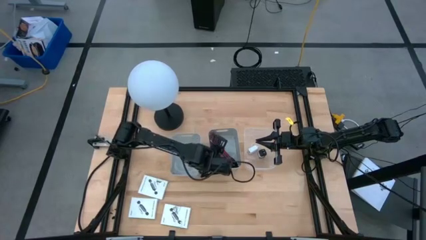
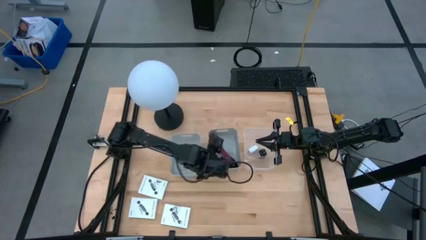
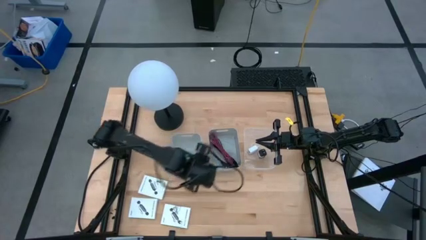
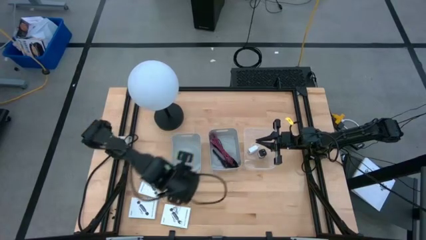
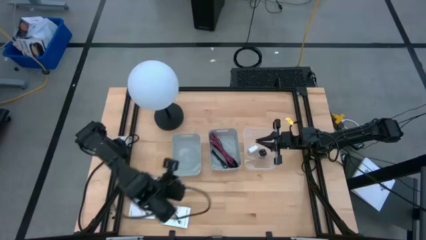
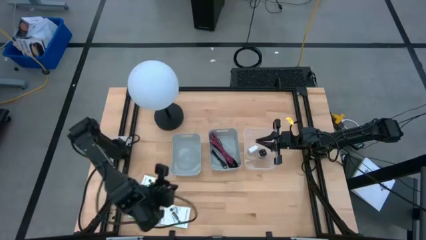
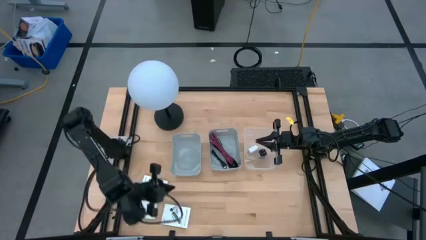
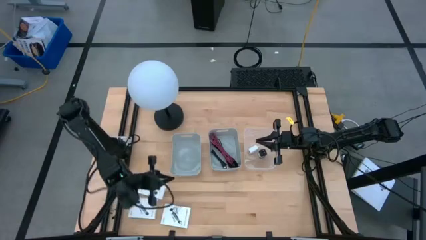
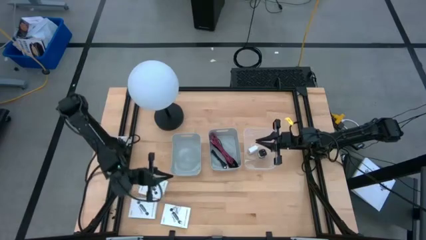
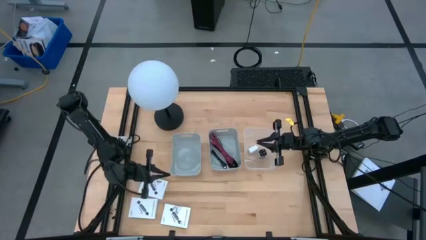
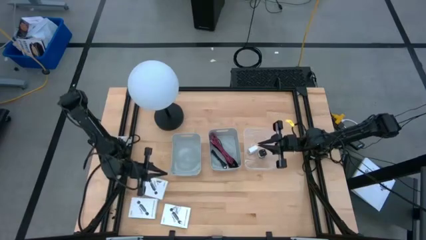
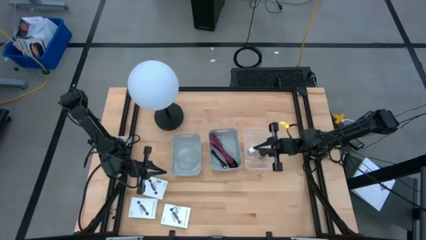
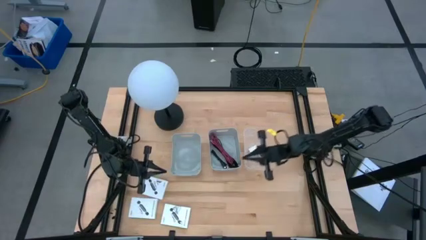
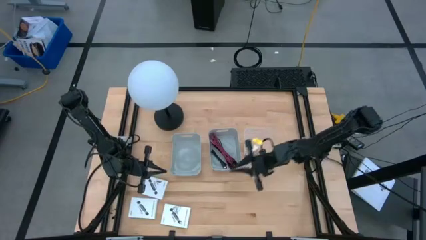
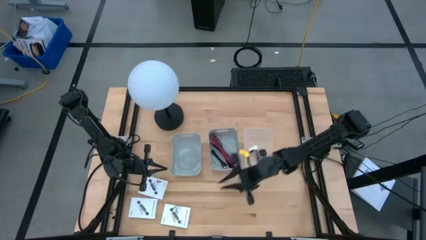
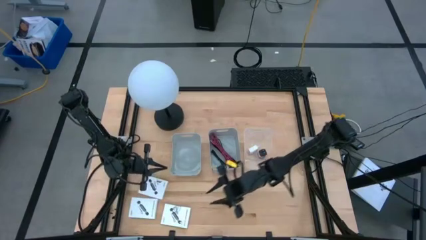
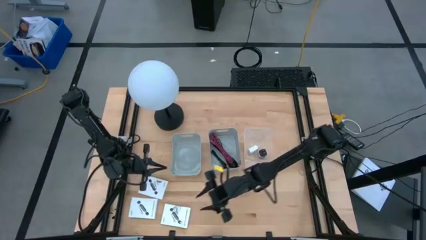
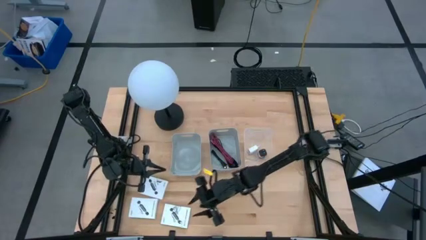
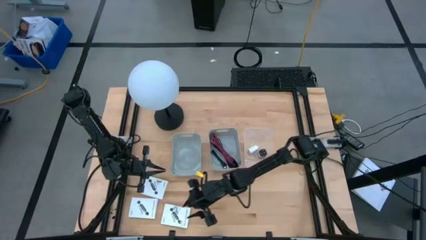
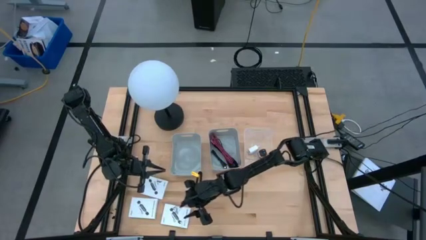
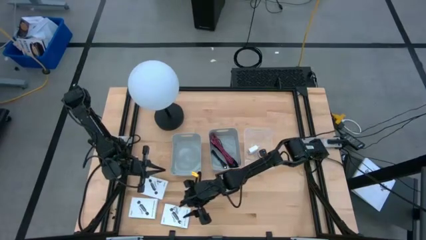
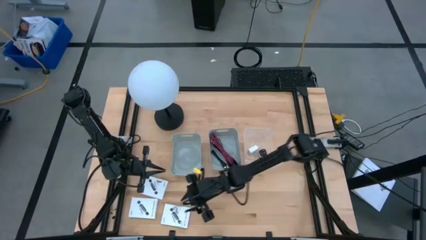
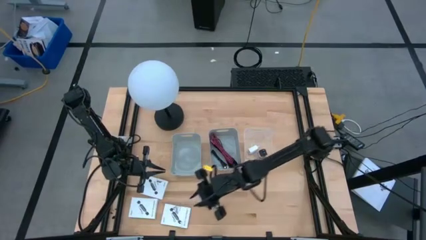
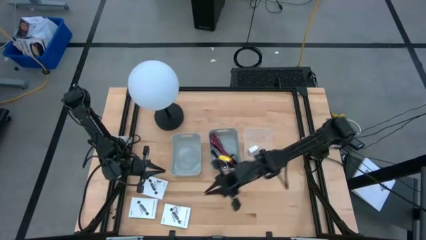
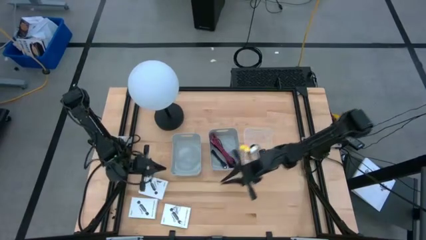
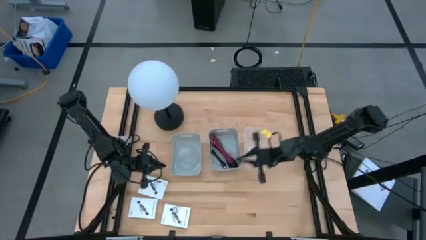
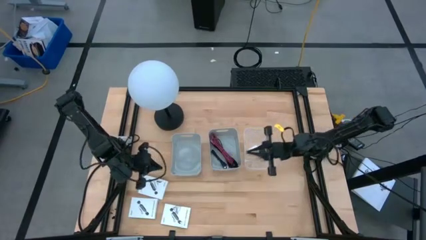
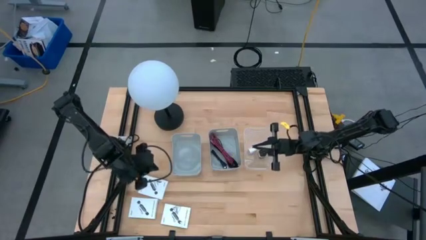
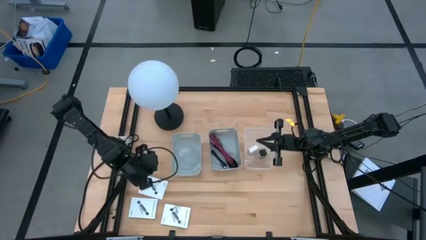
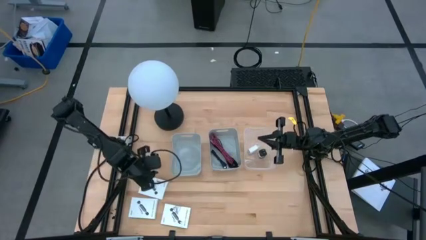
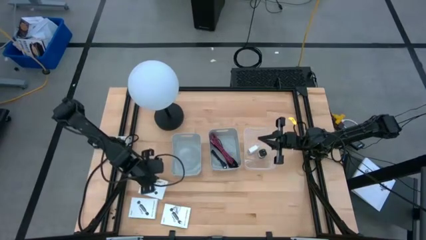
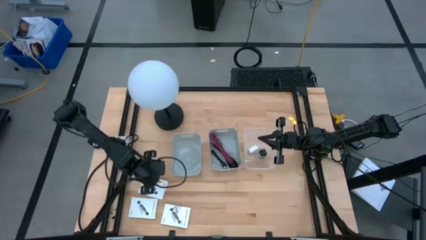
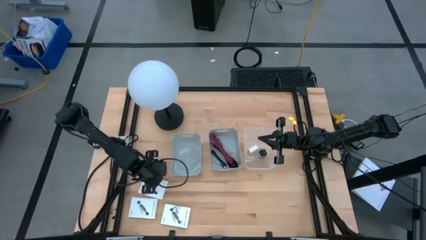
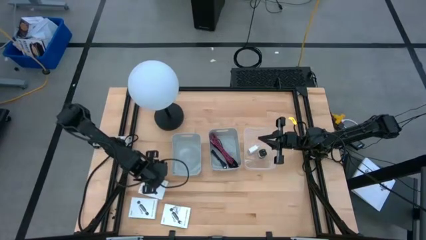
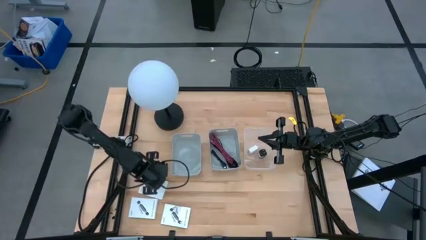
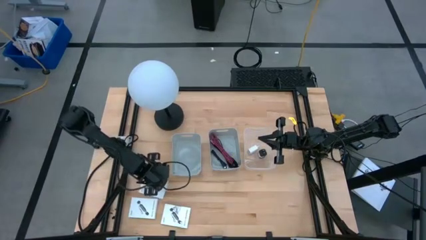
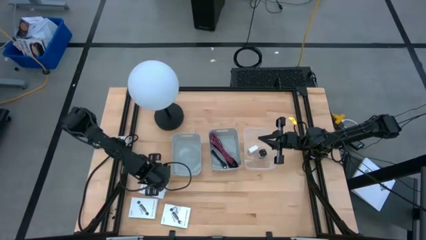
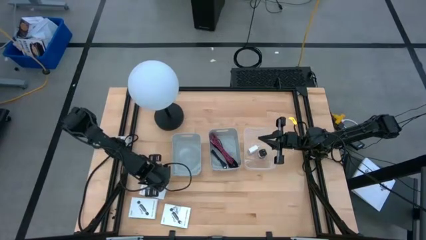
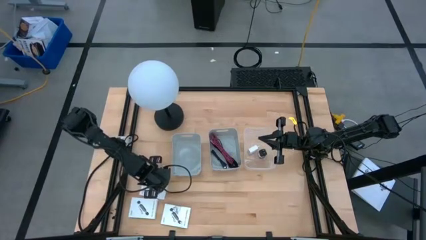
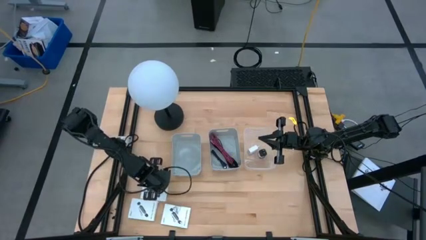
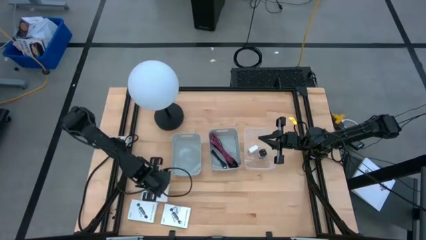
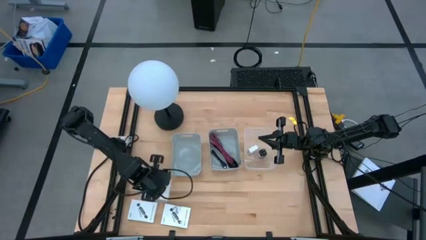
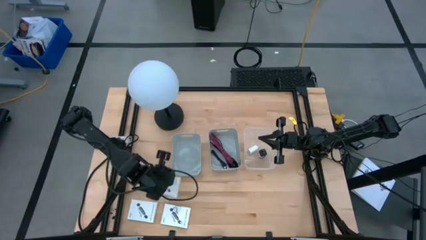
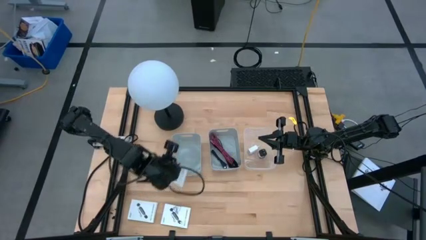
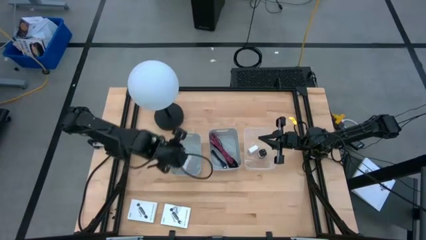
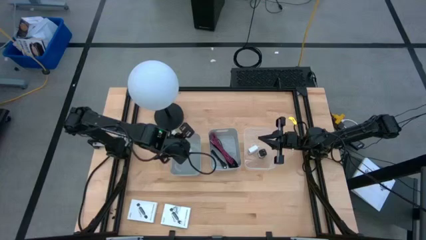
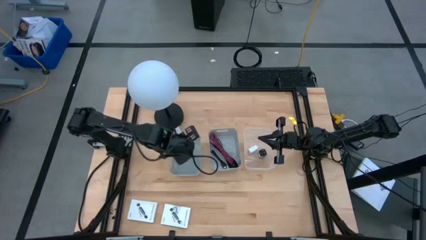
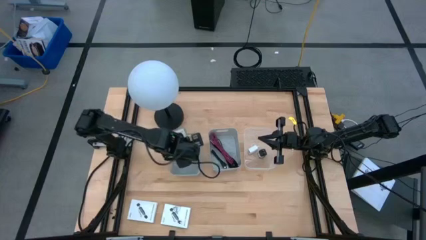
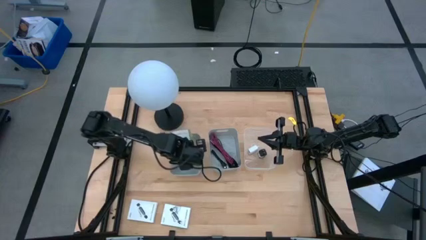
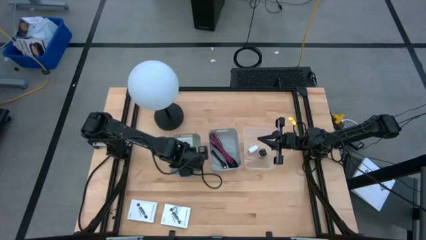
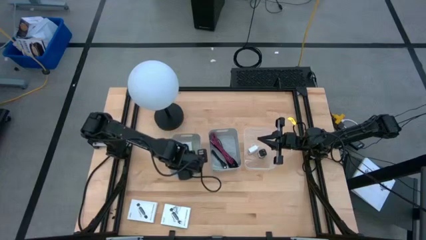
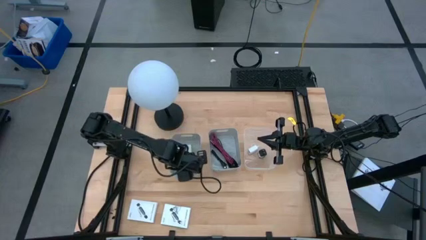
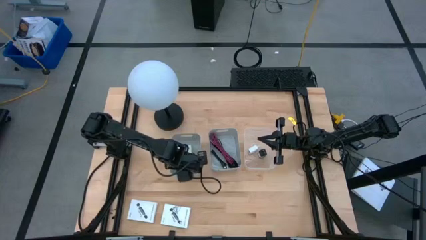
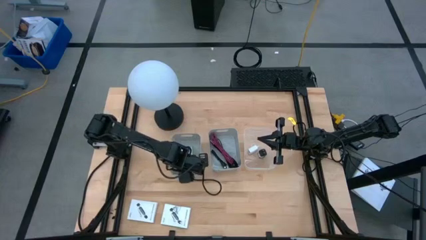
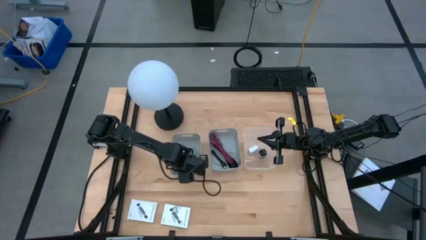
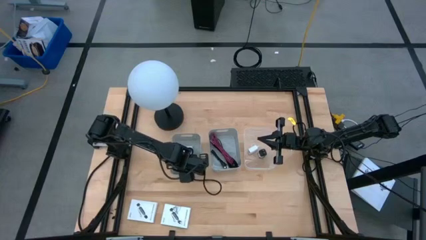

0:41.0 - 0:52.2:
Task: Pick and place items into bin
Put the top card reader box into the left gray bin

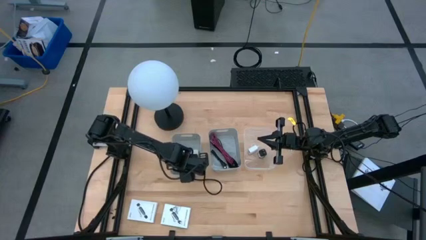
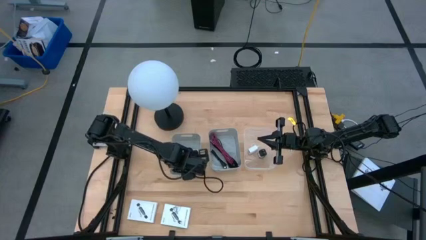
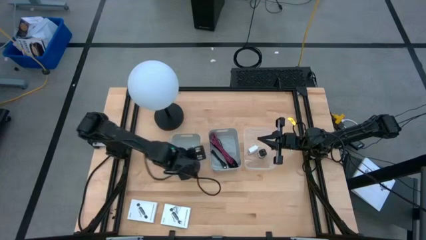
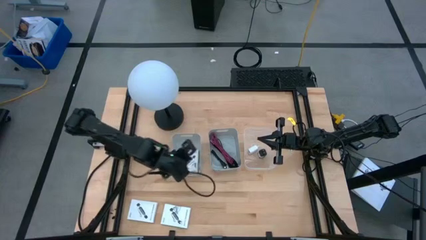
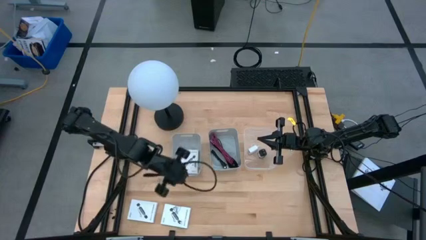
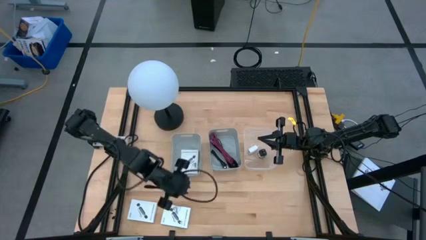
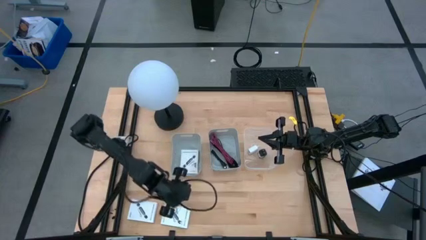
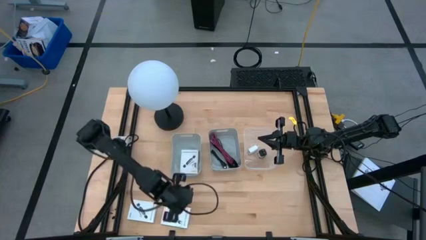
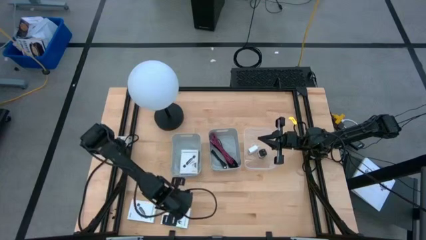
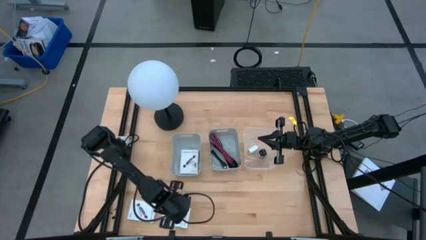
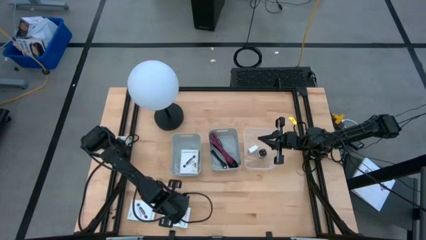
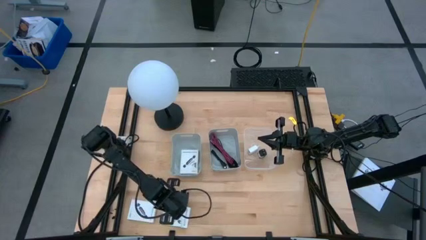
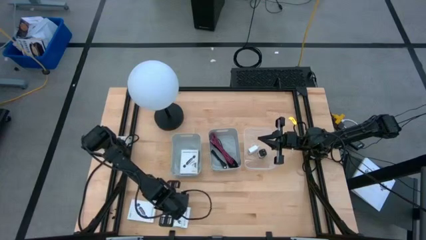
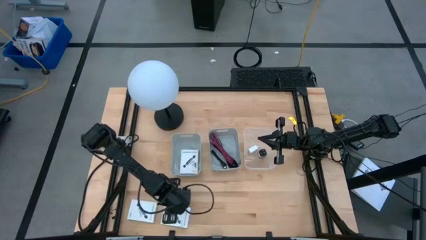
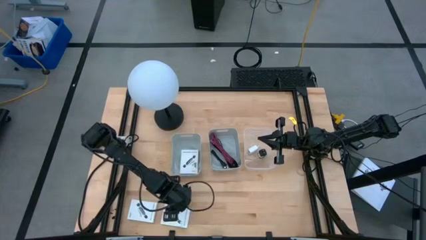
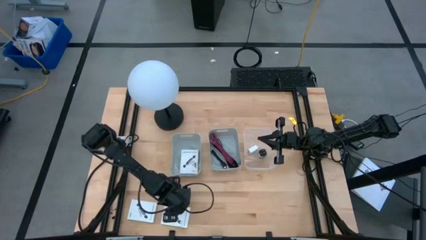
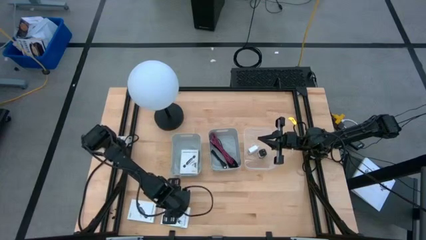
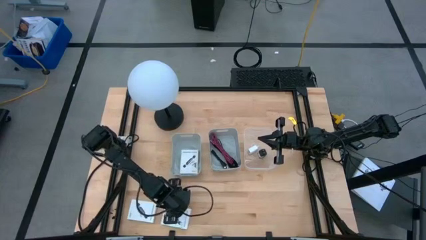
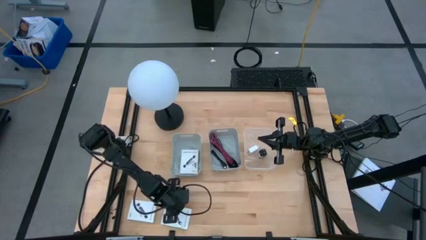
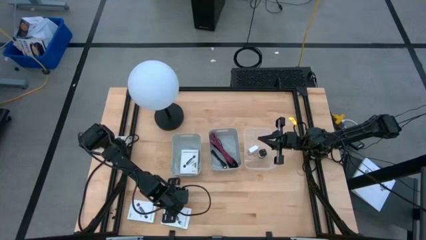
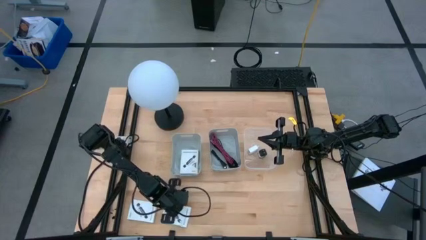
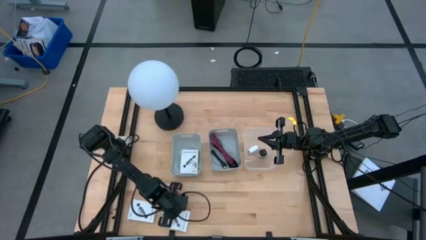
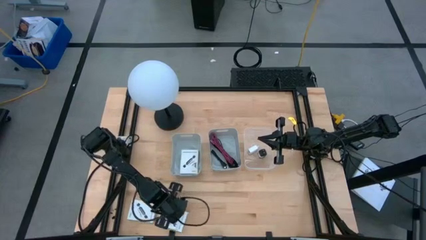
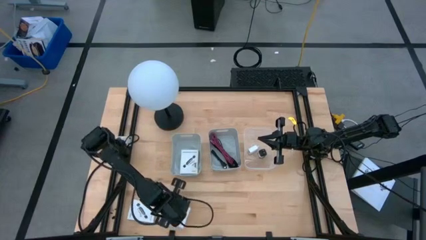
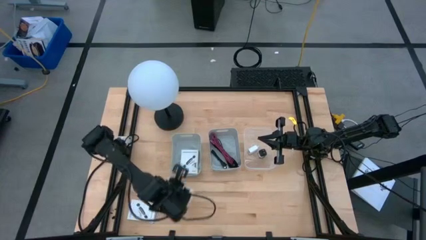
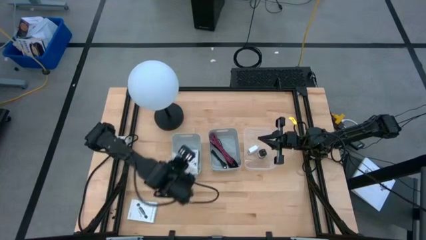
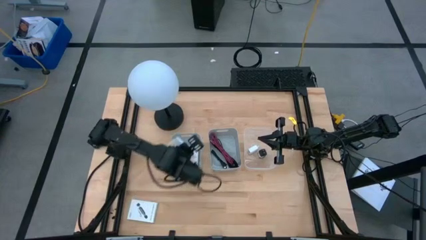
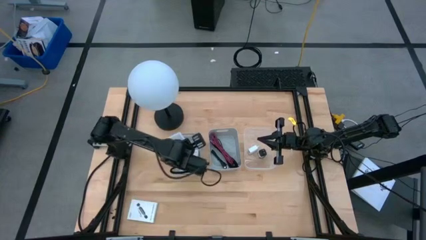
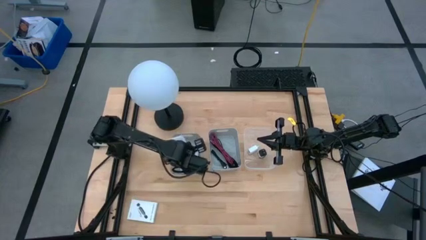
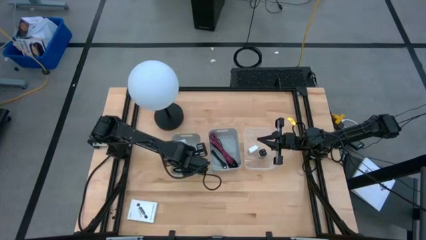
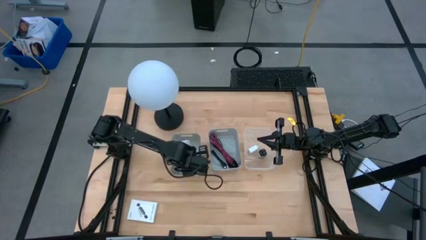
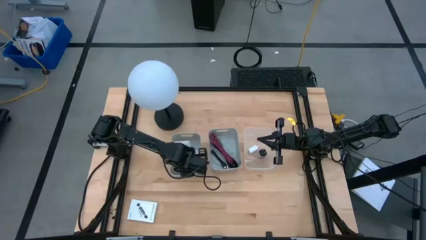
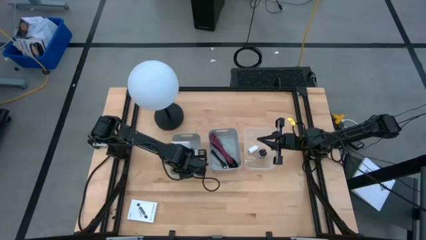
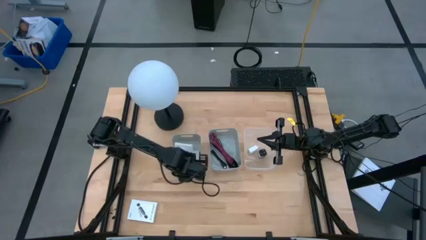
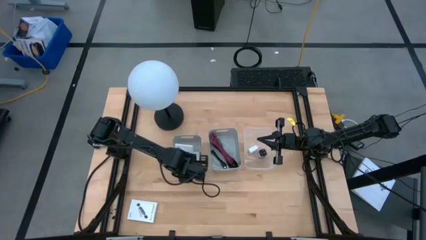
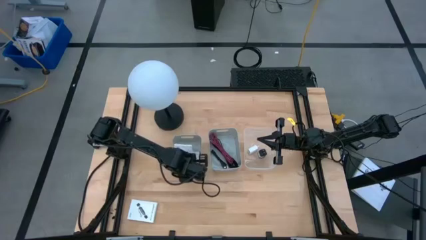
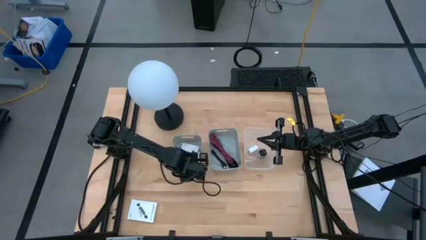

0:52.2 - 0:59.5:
Put the right card reader box into the left gray bin
